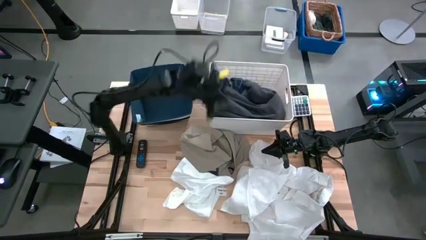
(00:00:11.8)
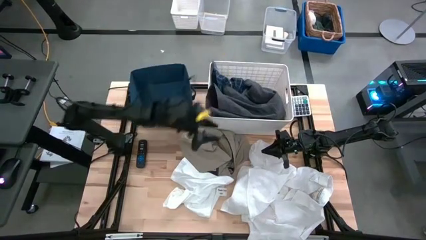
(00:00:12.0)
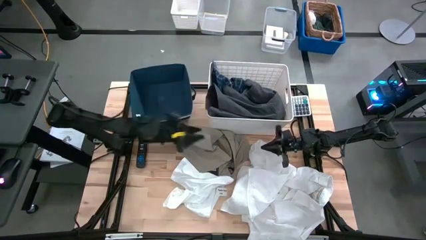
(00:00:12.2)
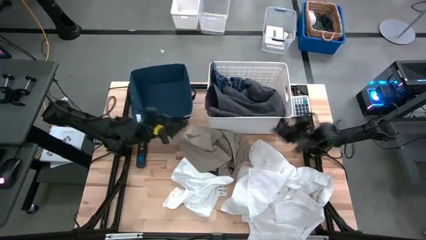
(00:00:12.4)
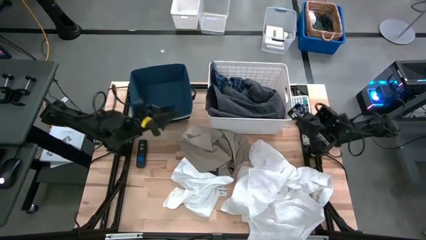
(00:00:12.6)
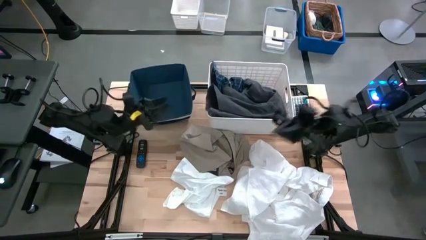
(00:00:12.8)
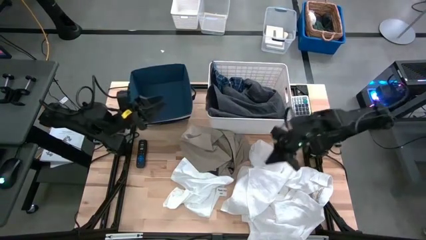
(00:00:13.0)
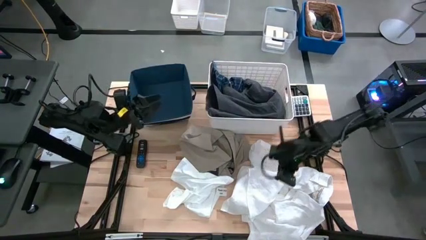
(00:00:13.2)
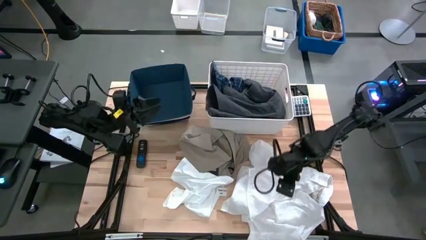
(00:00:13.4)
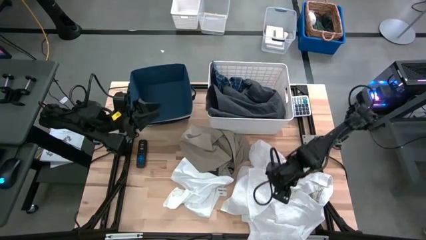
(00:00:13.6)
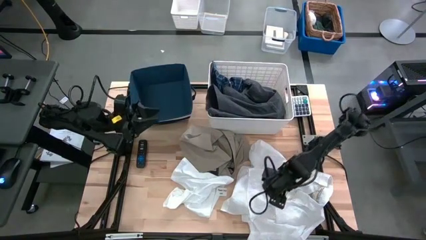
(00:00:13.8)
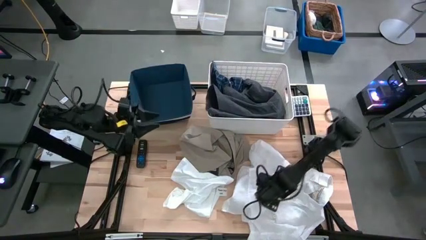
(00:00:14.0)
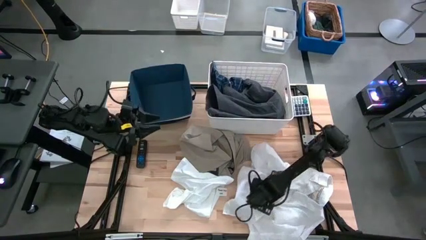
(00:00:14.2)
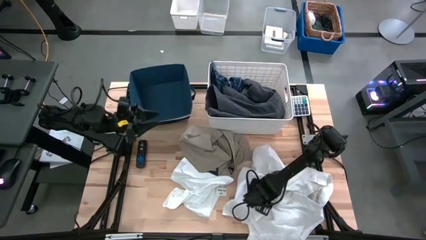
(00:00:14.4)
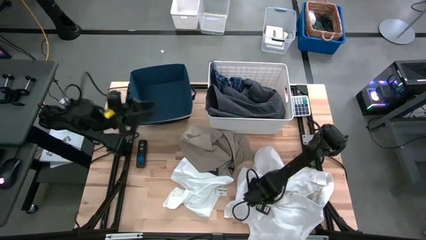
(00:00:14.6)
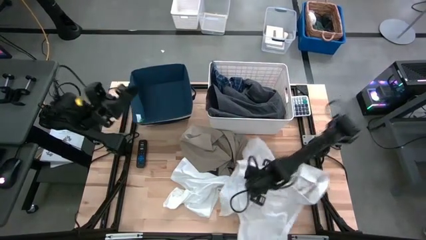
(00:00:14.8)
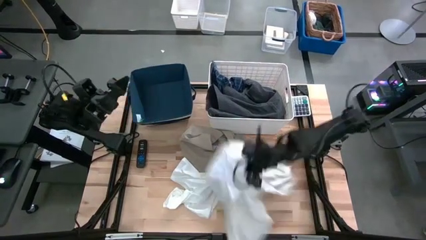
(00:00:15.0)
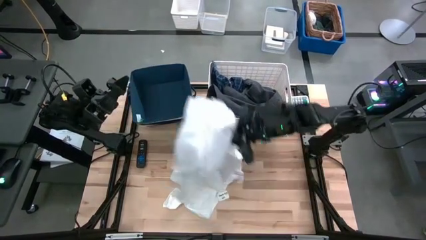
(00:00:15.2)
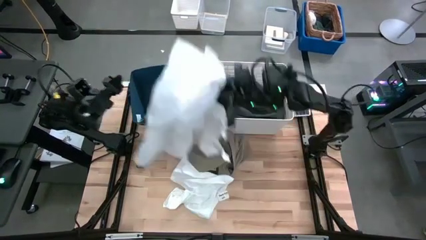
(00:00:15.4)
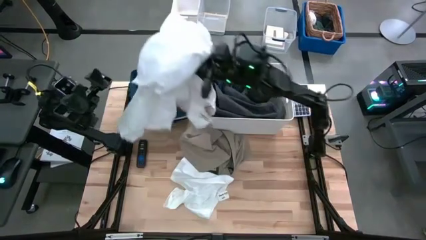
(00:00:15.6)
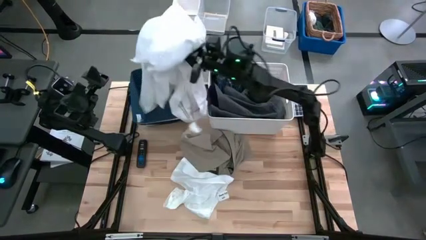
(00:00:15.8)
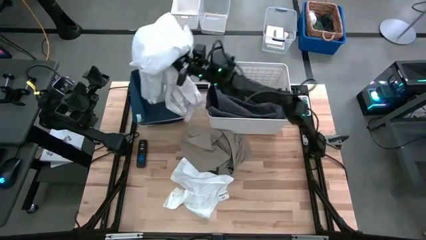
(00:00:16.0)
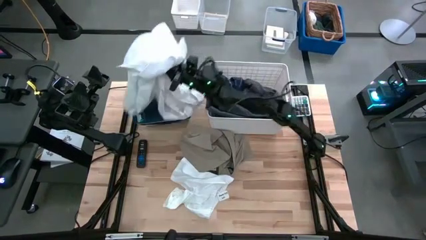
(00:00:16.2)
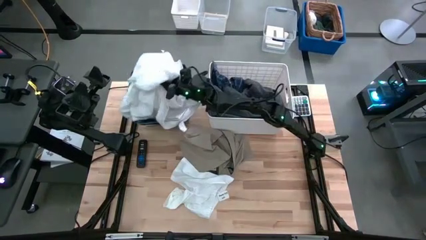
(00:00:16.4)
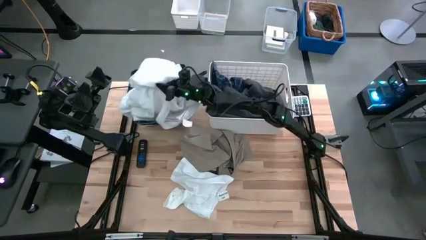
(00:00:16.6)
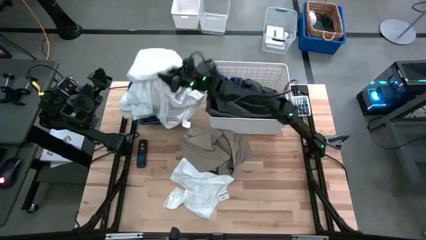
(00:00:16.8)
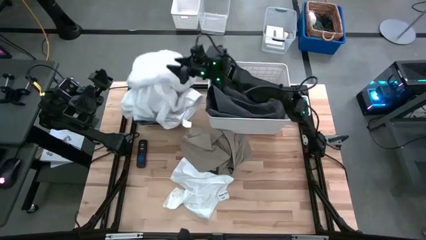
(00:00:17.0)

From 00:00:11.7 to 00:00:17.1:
Task: Sort clothes
Put the white shirt into the blue laundry organizer

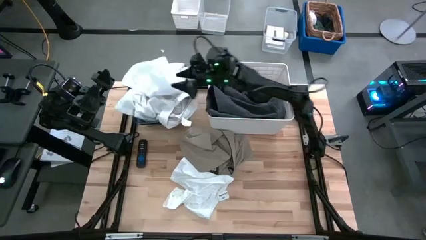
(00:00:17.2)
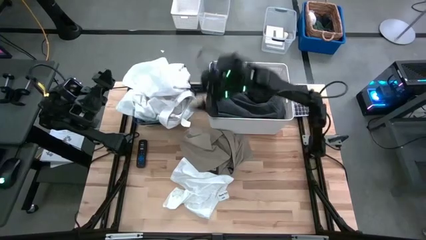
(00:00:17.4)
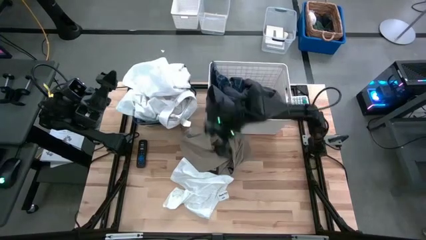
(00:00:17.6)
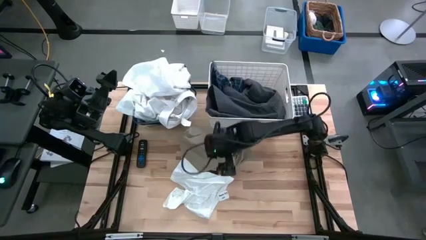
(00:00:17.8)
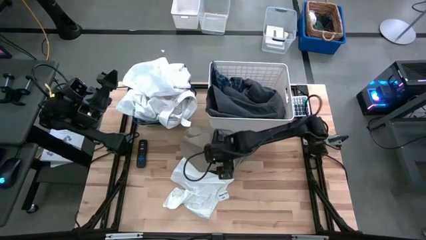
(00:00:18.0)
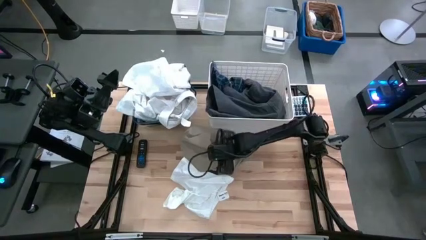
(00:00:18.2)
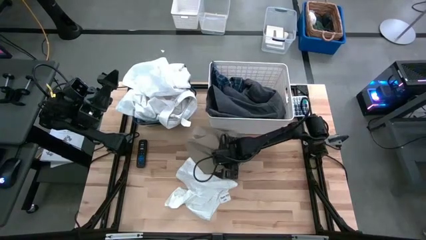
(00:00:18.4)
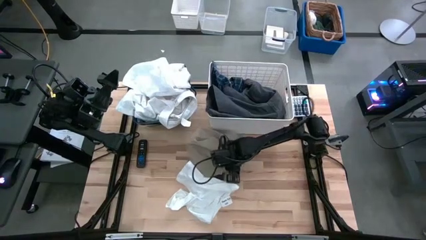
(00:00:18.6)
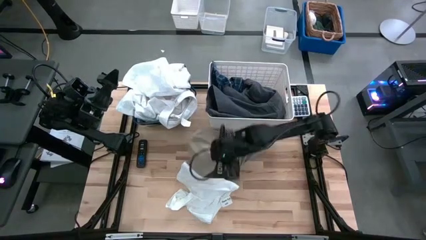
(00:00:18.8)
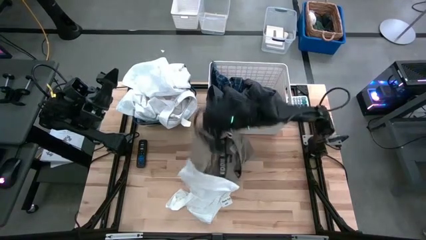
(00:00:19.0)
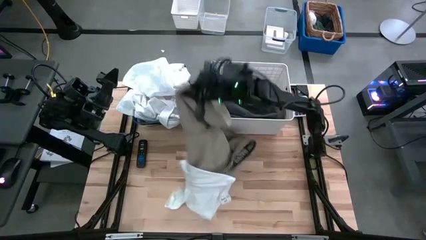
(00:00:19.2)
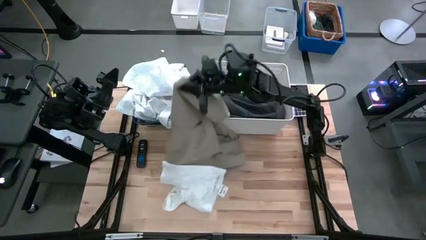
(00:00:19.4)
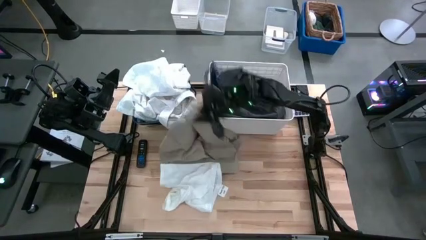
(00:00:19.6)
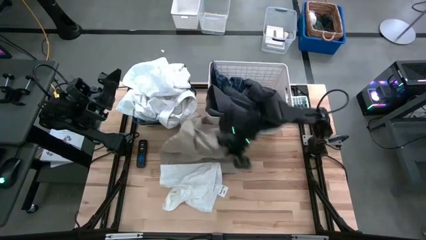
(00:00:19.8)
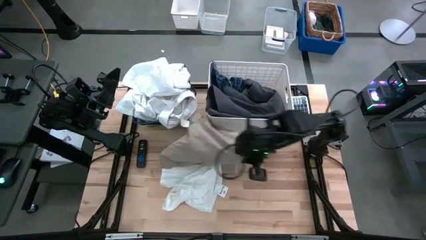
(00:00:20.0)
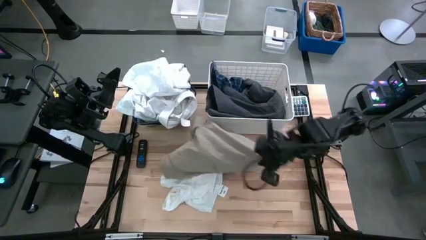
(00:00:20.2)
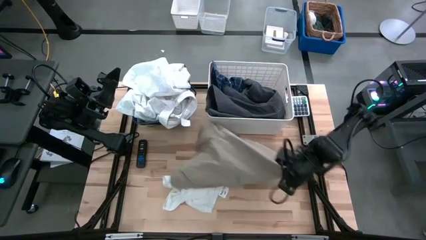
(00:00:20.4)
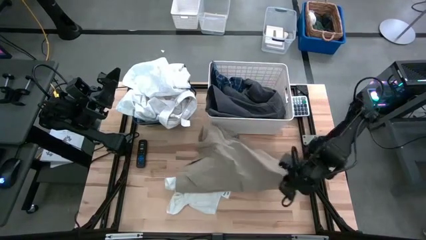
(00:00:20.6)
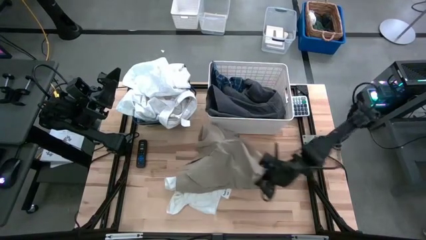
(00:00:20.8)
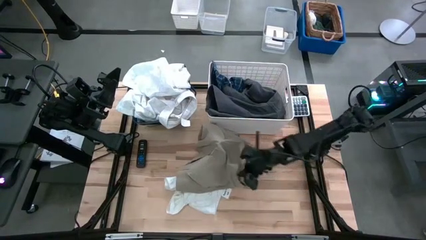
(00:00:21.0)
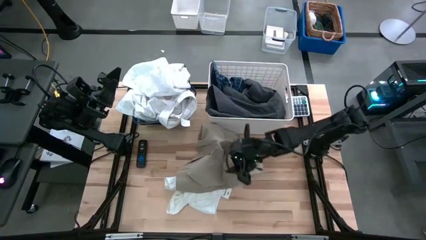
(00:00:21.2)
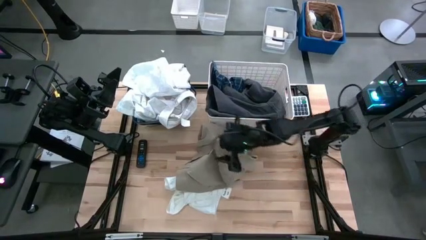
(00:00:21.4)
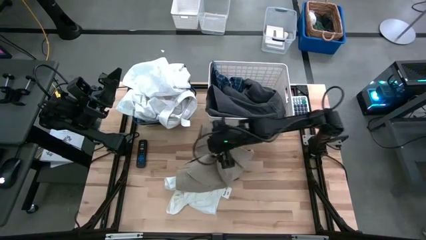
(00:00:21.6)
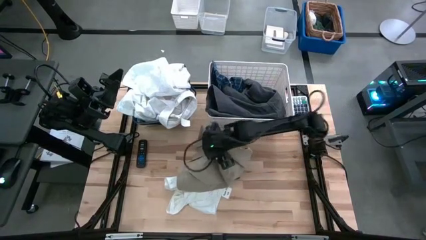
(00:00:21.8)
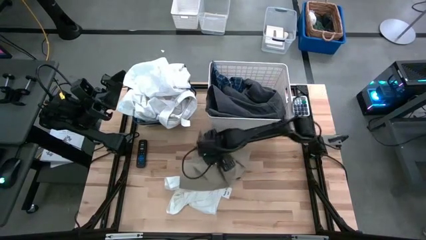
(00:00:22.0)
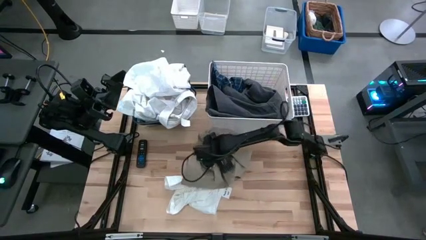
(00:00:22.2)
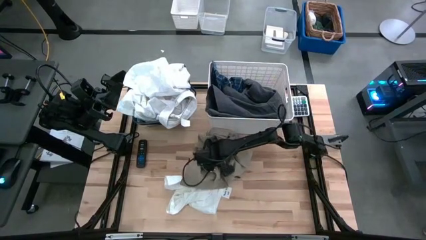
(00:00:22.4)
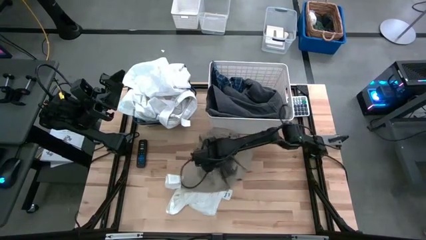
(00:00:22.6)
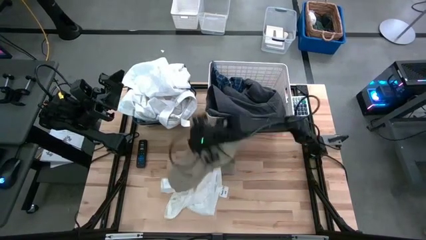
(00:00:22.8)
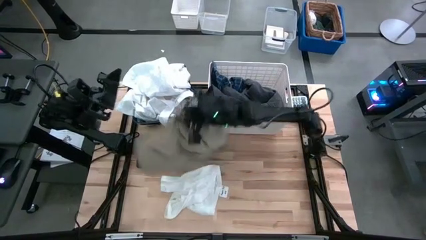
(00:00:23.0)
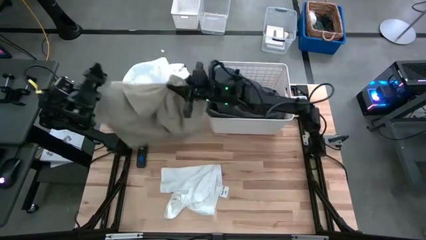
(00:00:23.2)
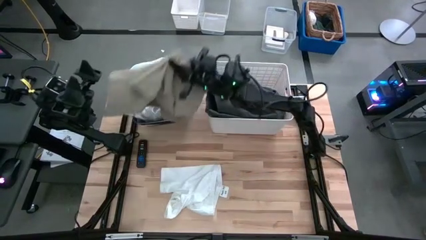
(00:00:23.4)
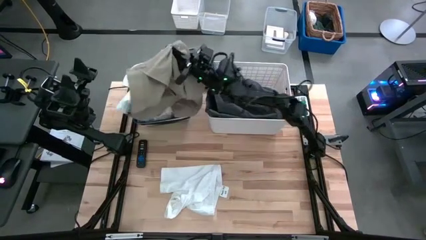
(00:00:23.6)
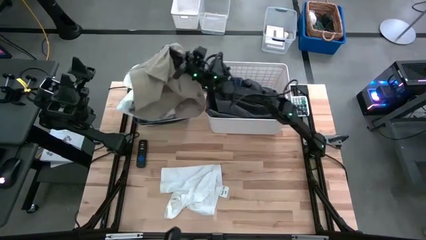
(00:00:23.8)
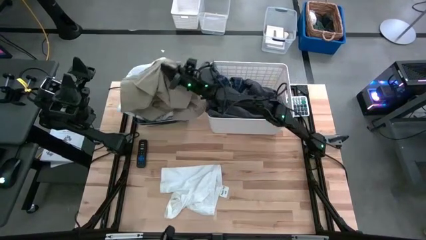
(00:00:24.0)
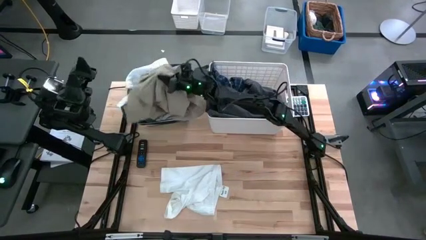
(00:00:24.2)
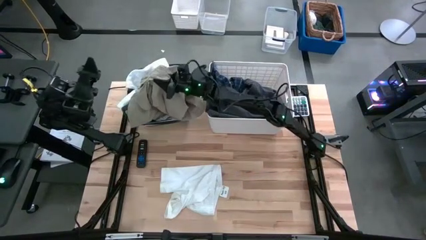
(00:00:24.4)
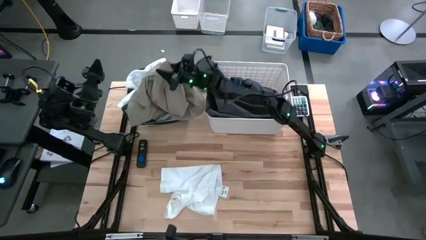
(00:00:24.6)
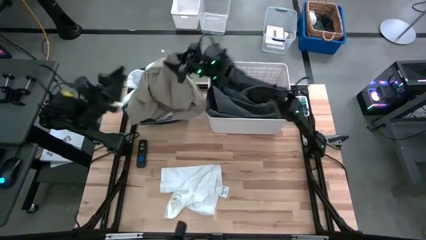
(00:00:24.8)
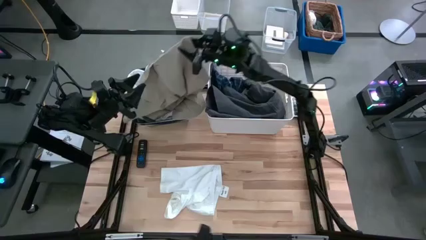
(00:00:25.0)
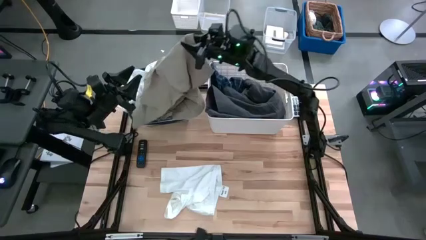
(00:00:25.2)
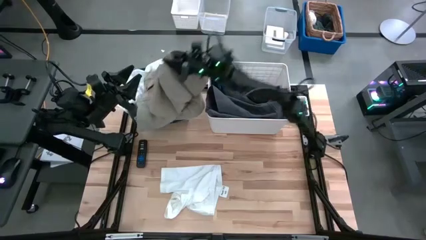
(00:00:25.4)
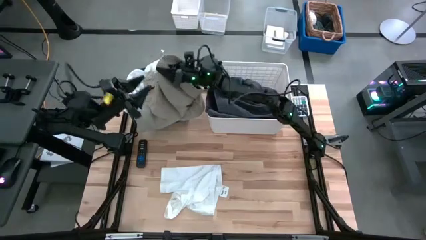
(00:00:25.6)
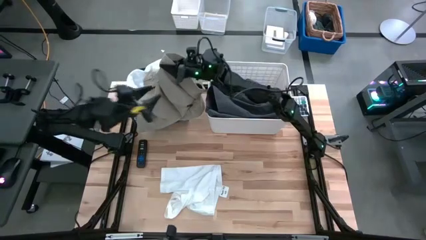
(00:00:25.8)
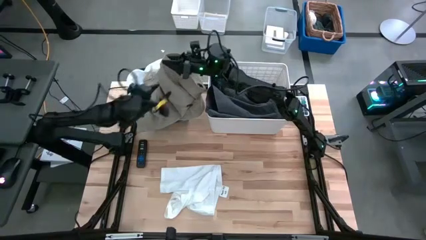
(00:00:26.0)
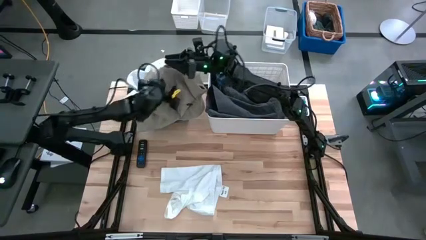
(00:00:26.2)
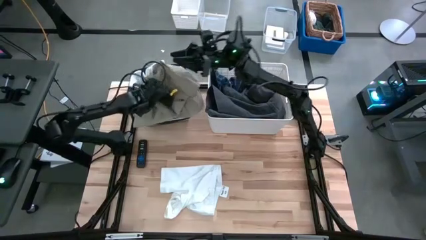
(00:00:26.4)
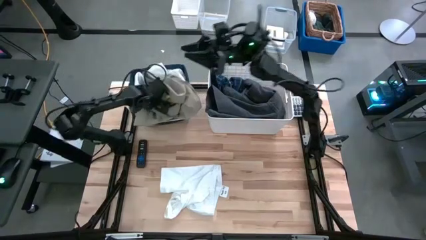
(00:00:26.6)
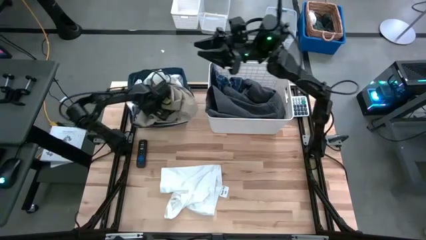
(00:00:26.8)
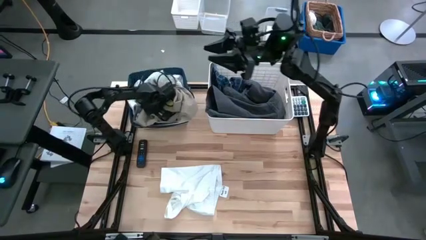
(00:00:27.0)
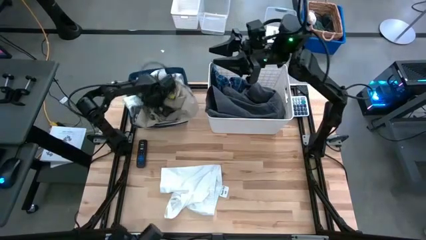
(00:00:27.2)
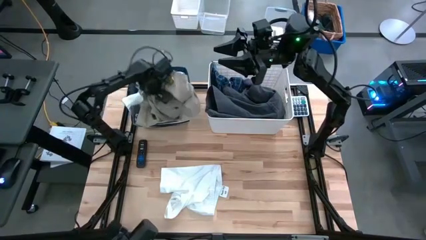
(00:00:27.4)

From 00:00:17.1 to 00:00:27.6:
Put the brown short into the blue laundry organizer

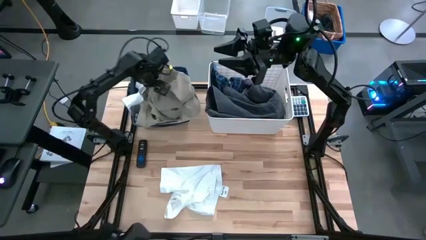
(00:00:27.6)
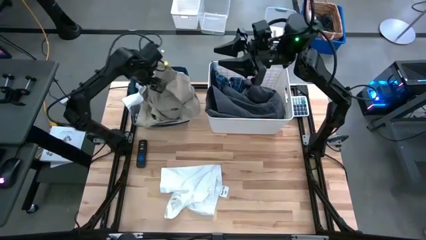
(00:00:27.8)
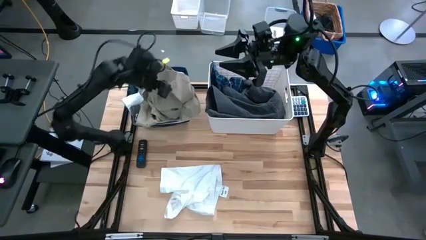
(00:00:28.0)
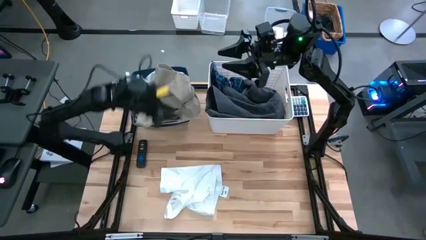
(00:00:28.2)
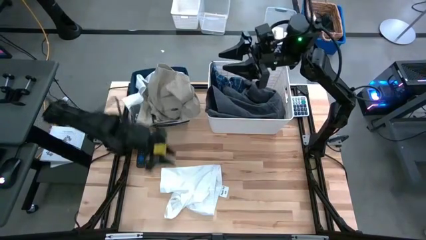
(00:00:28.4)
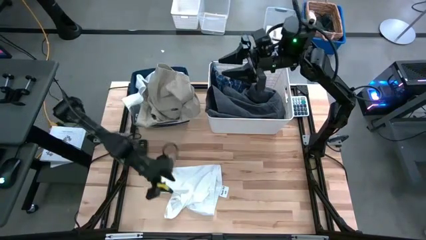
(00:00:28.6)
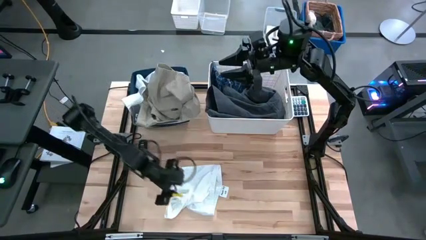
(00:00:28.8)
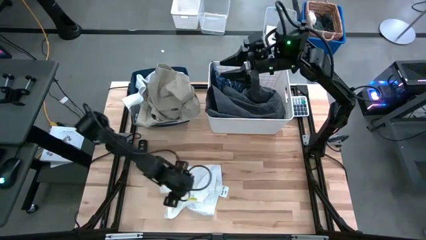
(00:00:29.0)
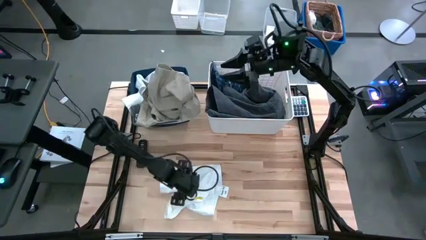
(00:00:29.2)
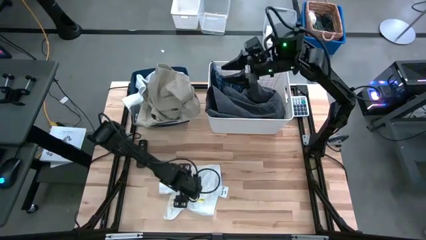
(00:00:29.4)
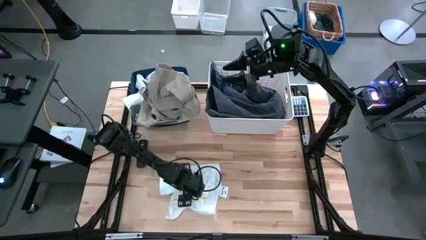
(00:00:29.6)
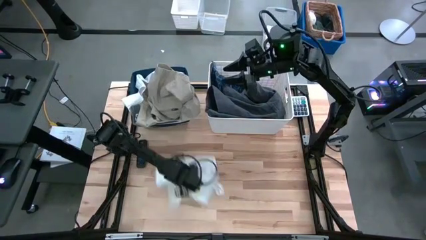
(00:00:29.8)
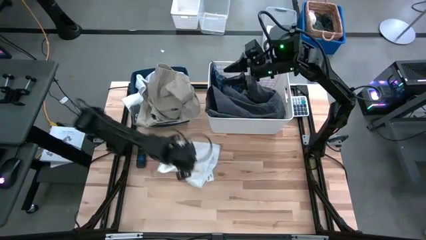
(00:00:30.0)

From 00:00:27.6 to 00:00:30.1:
Put the white short into the blue laundry organizer
